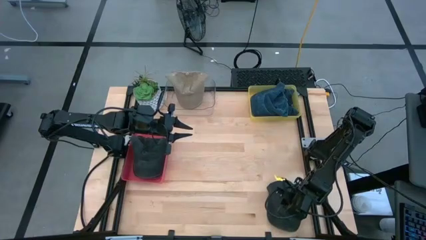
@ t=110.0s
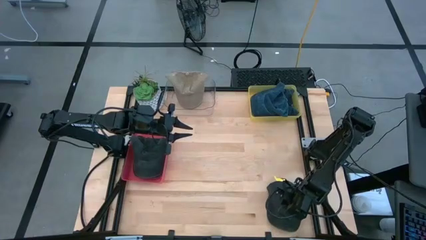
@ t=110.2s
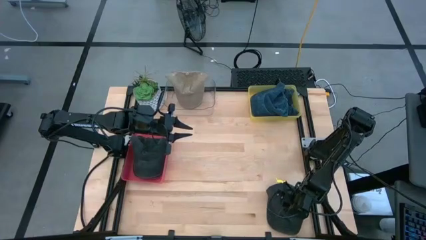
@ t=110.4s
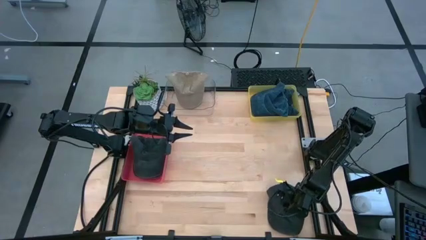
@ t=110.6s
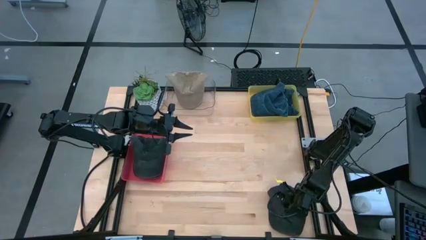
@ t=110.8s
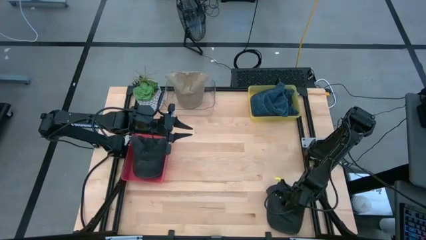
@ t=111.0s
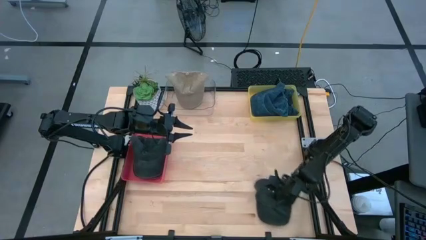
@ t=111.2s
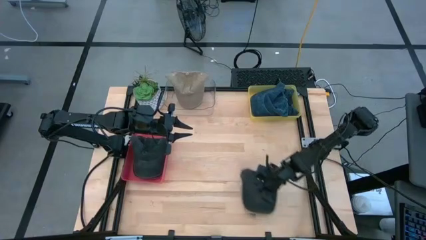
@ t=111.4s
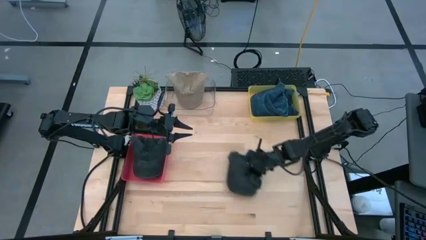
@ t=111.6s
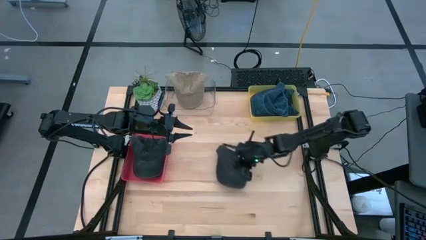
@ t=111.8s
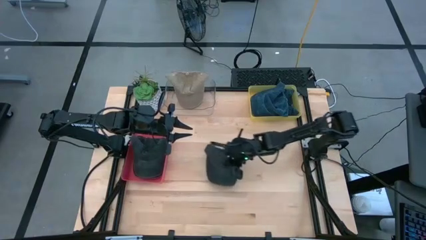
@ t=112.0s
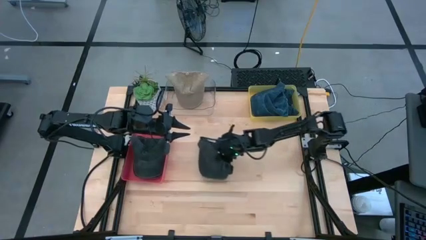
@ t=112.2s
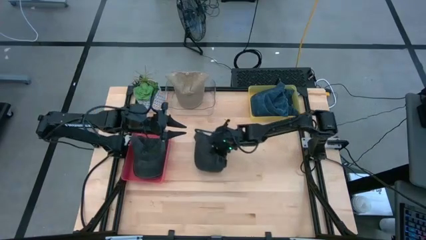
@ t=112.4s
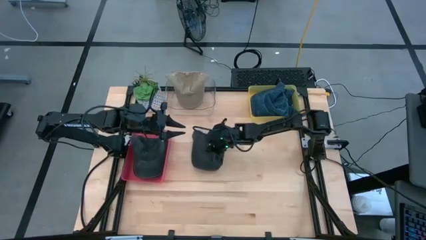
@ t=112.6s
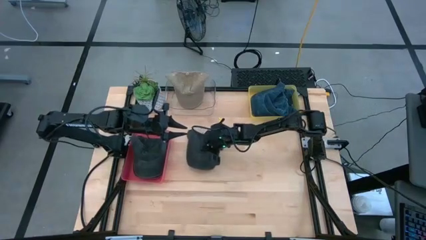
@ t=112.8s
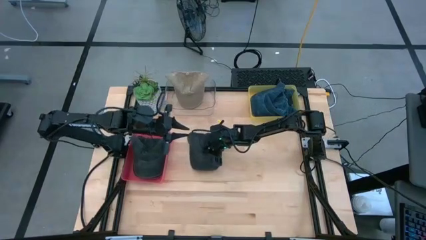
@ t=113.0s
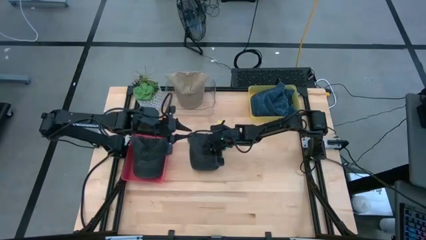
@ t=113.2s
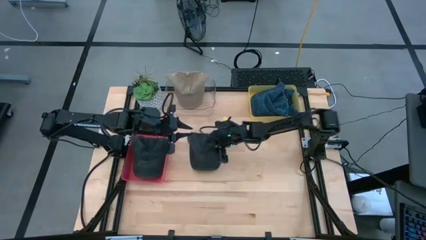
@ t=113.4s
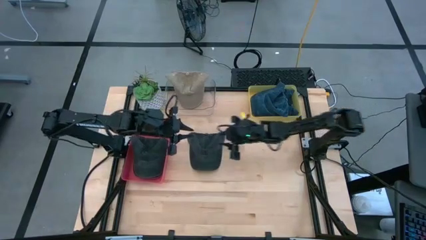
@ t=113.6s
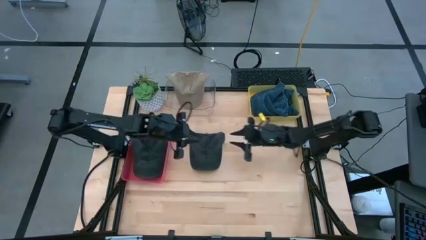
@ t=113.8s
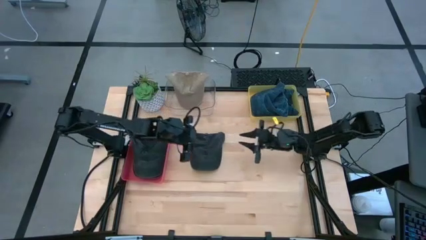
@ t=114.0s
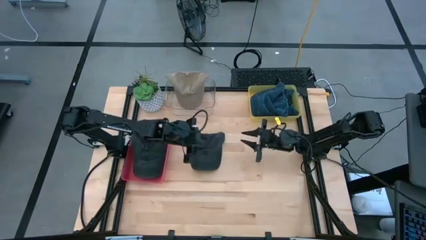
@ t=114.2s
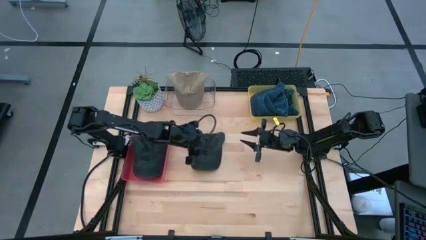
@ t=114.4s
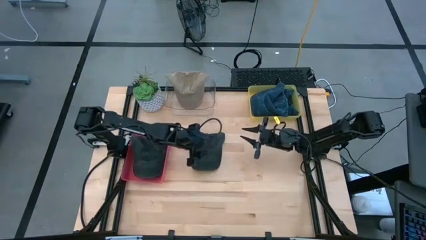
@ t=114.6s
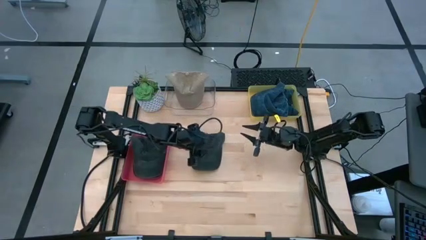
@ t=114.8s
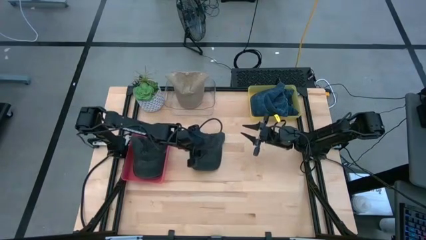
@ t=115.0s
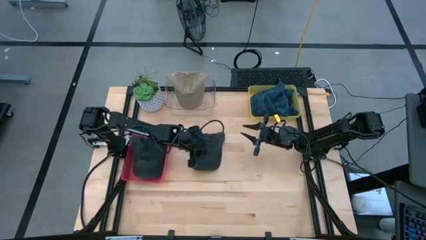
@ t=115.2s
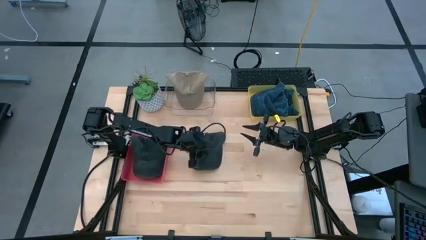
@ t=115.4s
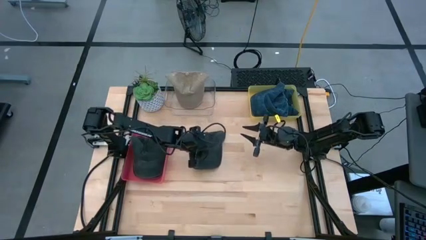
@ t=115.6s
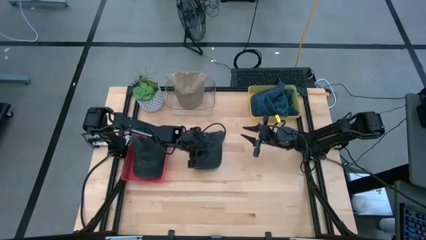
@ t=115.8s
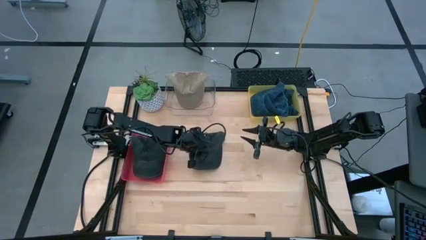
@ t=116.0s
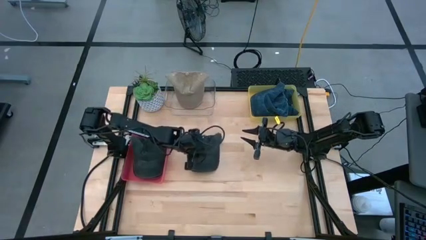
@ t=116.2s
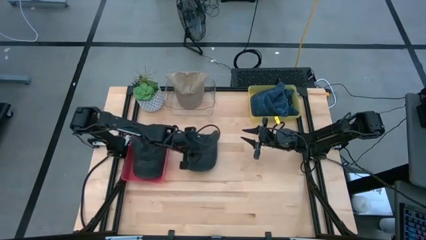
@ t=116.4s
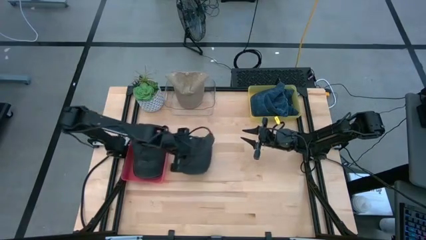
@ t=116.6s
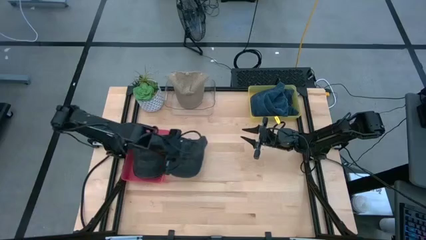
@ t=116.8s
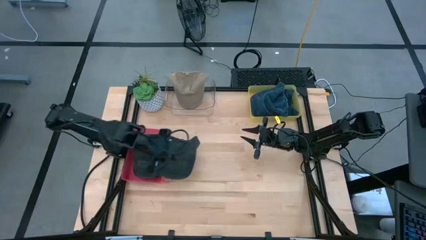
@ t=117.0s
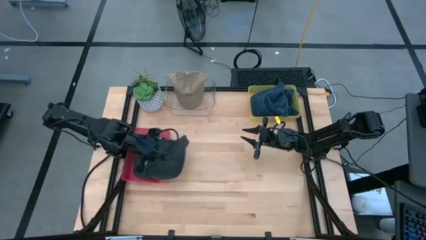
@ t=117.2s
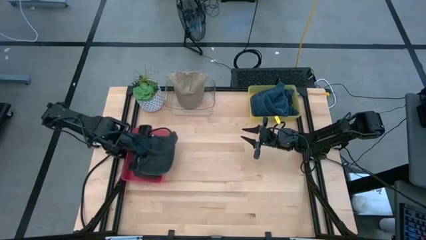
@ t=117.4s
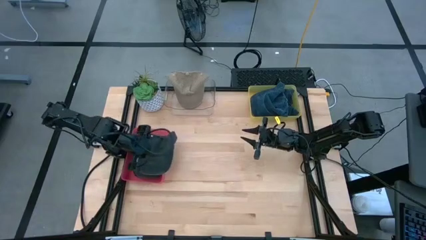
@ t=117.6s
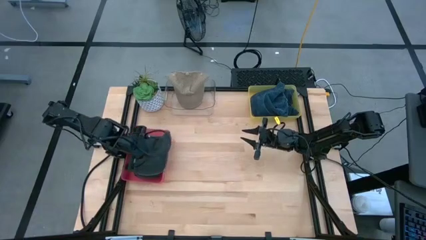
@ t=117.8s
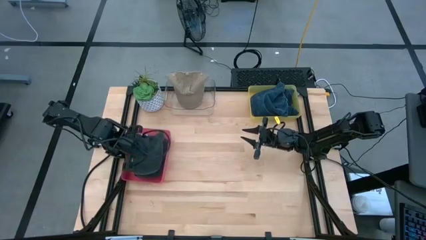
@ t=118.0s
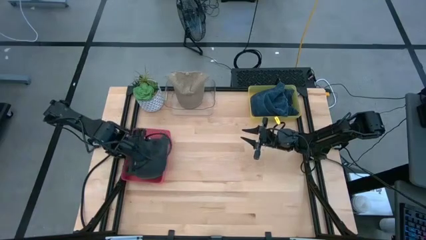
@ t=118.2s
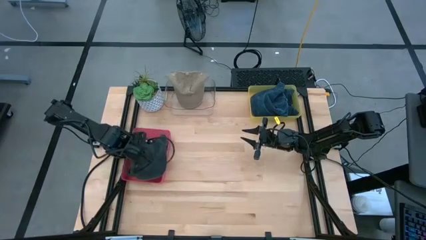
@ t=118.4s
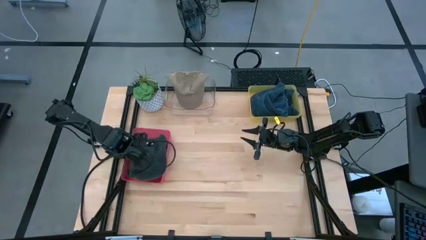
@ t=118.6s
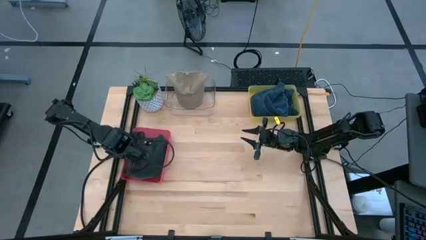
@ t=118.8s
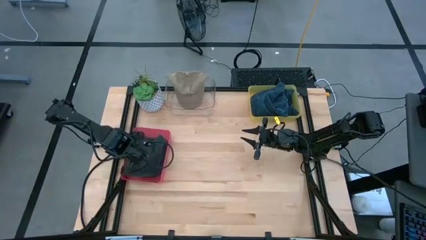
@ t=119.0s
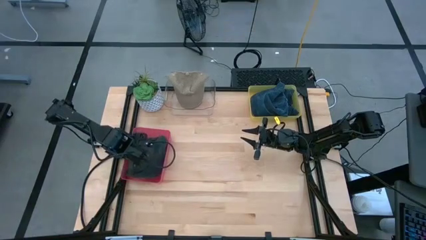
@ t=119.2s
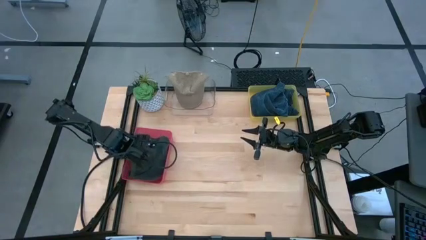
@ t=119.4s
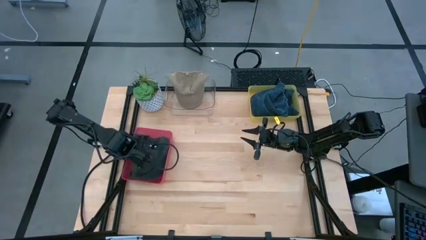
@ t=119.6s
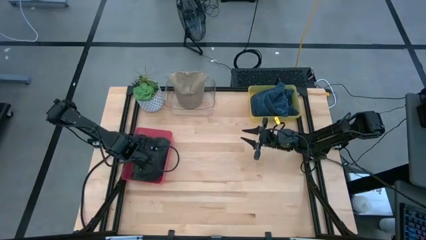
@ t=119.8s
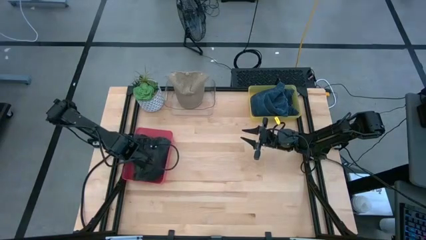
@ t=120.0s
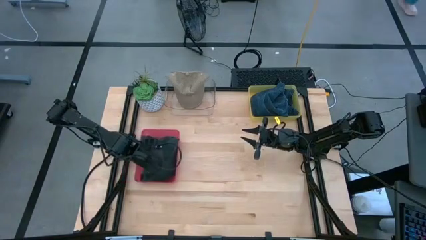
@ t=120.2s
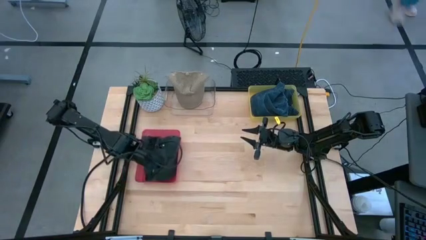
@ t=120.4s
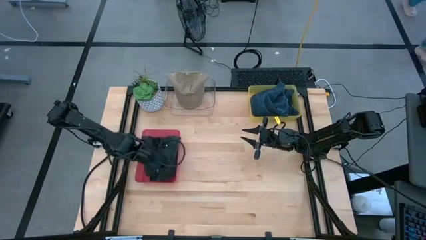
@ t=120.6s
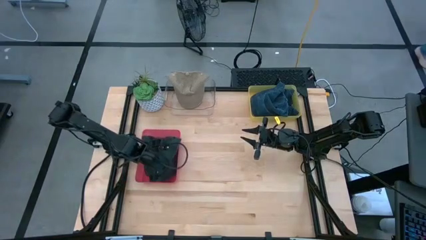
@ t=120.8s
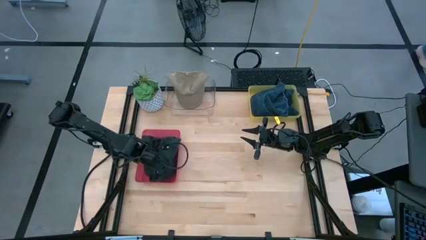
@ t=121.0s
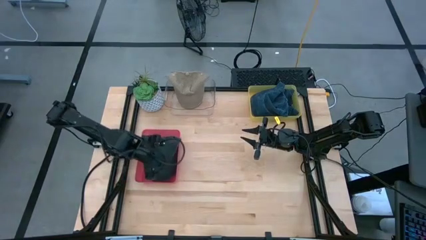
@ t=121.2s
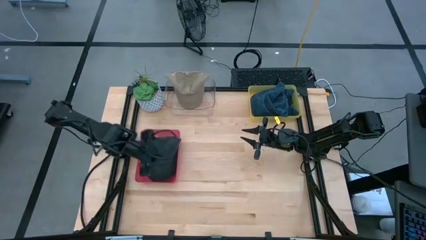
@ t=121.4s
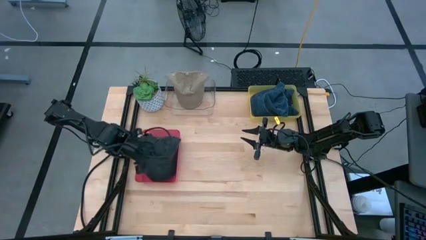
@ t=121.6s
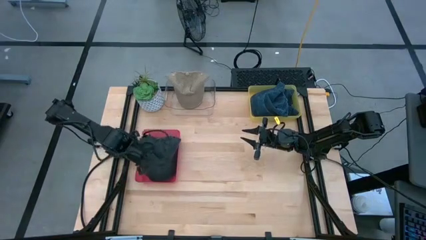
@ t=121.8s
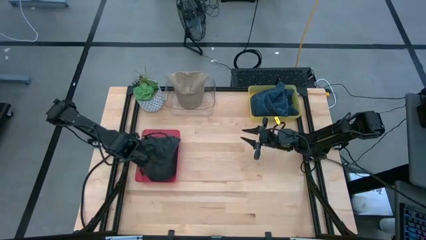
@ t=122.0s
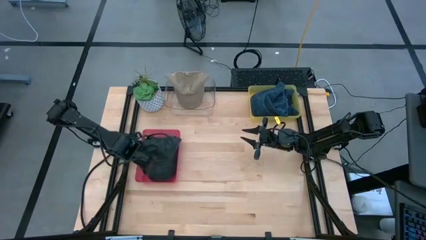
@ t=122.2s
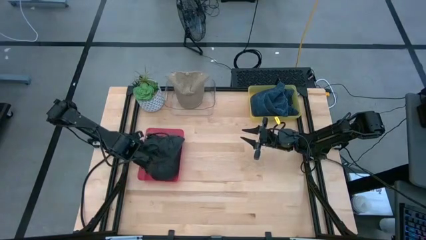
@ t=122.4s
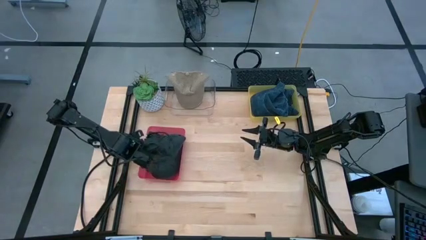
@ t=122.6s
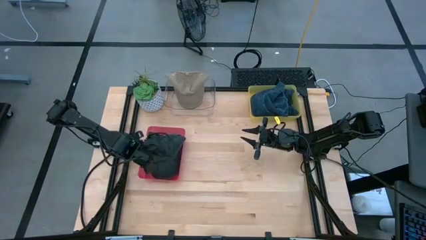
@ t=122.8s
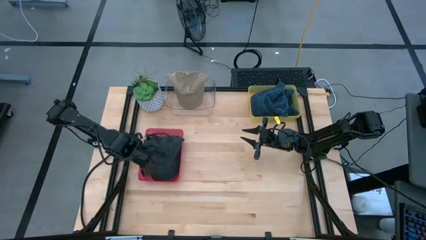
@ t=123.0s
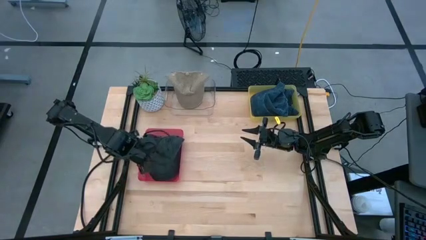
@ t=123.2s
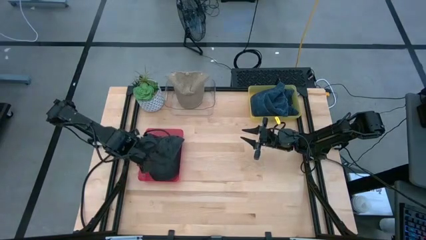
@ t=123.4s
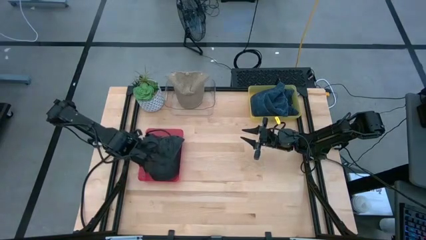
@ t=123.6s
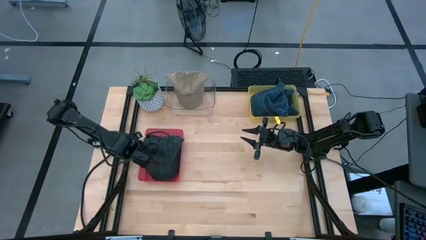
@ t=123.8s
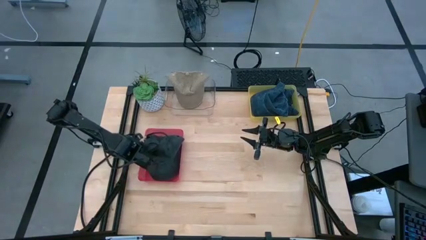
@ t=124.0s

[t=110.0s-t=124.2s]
Task: Pick & Place hat
Put the black cap into the red bin

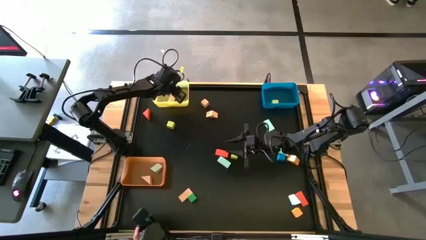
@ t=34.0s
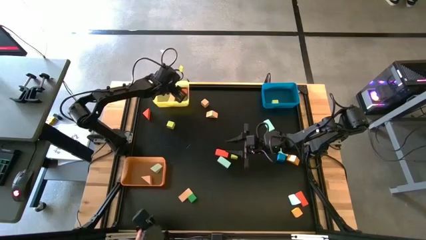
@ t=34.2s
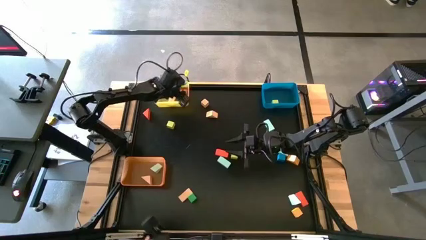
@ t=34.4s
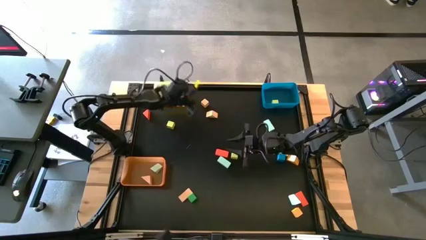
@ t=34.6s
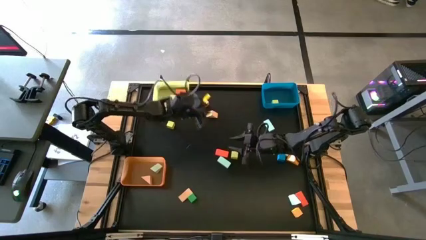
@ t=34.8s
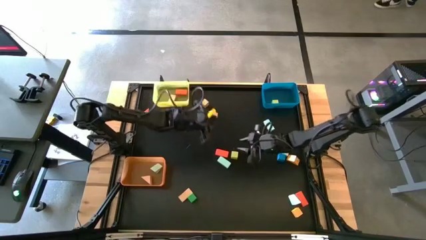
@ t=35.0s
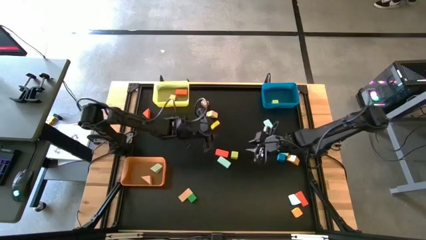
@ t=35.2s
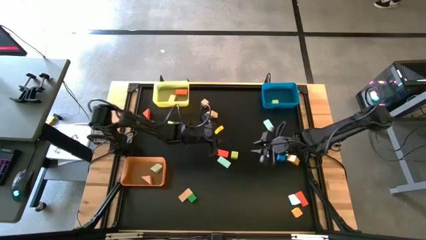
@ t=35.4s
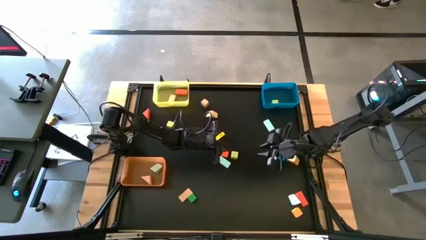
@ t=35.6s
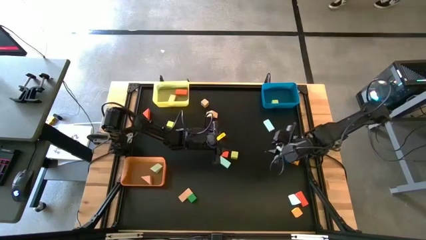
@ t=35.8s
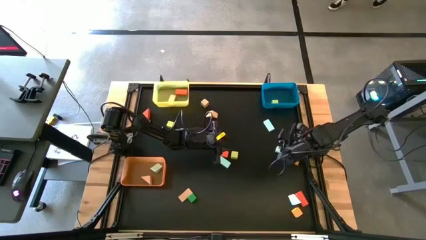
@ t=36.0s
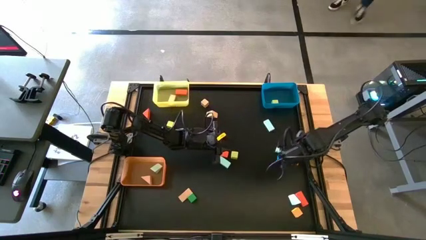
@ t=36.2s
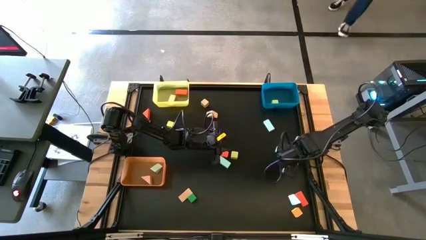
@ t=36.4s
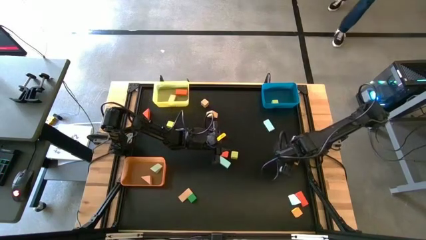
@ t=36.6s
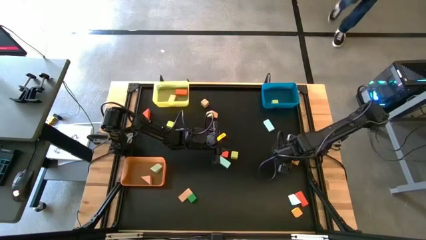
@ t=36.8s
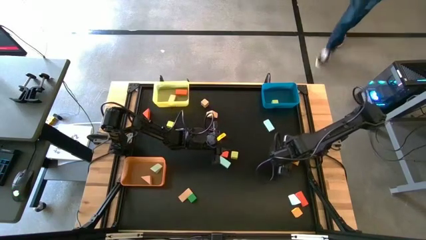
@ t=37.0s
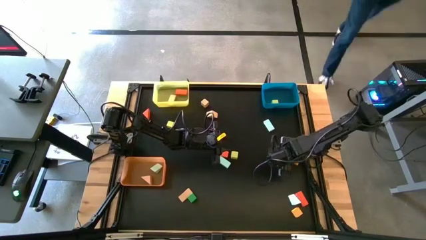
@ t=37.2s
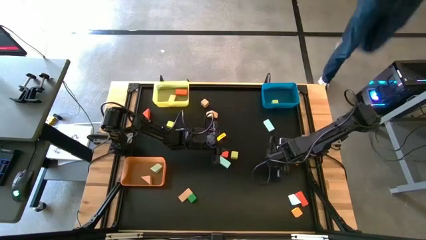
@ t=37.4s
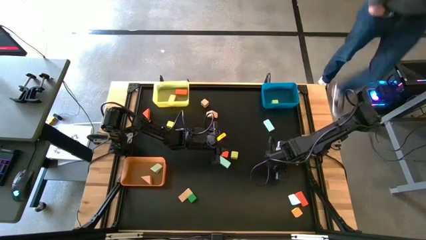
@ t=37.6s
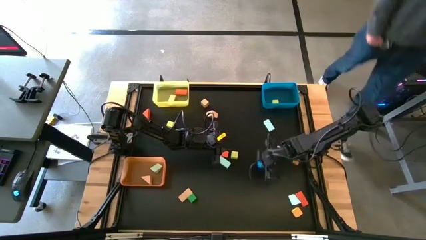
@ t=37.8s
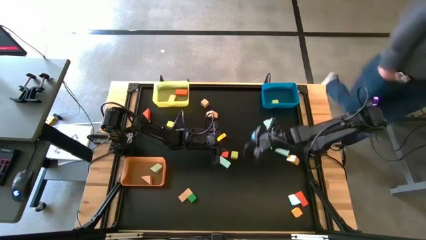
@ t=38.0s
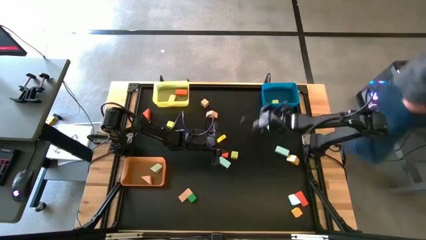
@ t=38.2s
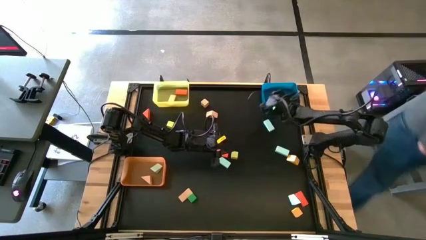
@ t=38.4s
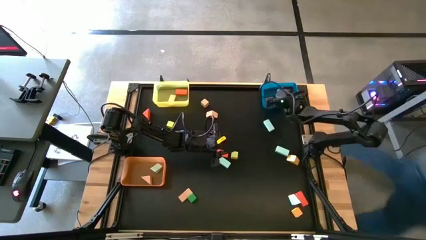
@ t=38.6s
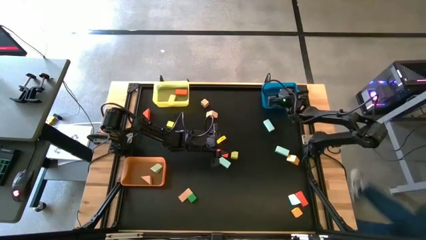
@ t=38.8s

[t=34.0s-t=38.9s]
Task: Sort blocks by size
Put the blue wooden block into the blue bin
